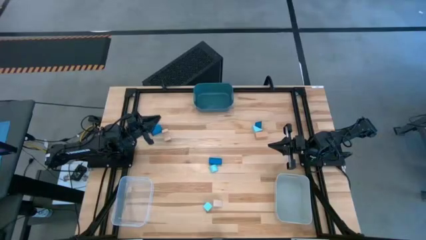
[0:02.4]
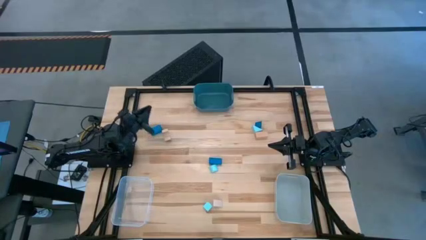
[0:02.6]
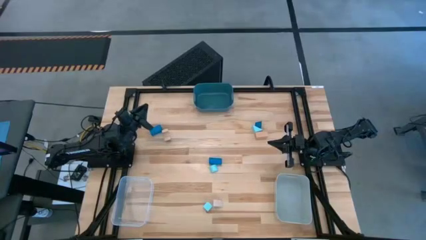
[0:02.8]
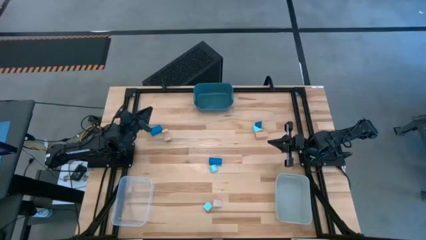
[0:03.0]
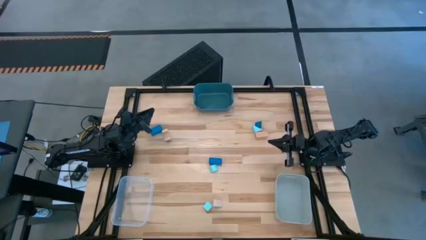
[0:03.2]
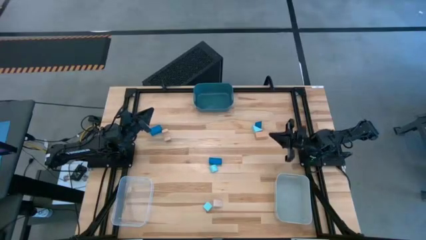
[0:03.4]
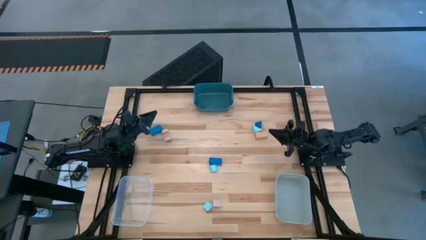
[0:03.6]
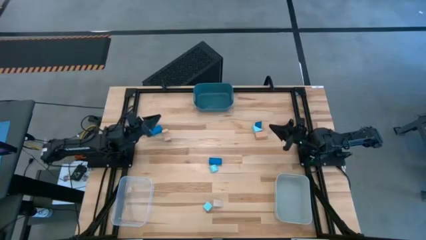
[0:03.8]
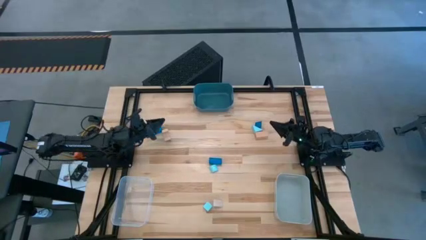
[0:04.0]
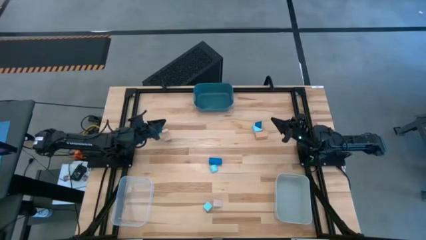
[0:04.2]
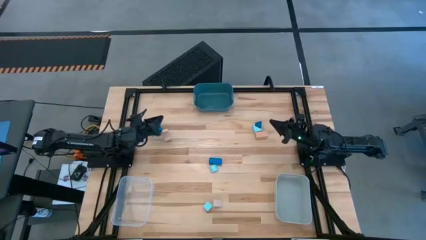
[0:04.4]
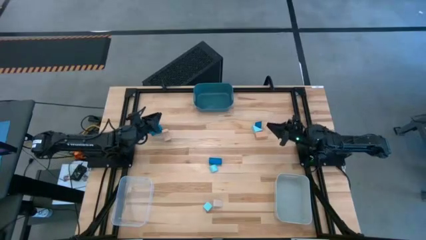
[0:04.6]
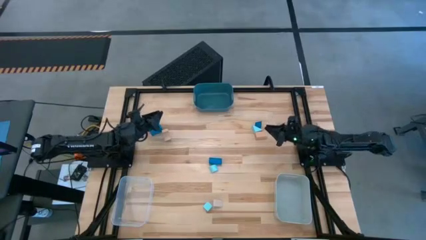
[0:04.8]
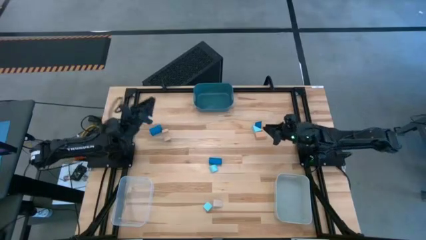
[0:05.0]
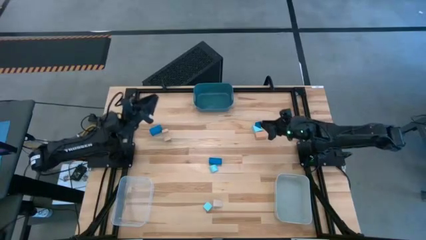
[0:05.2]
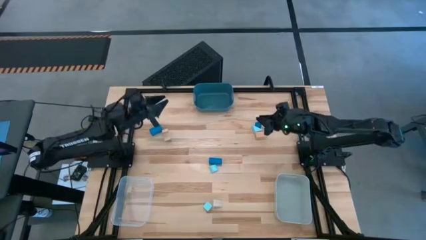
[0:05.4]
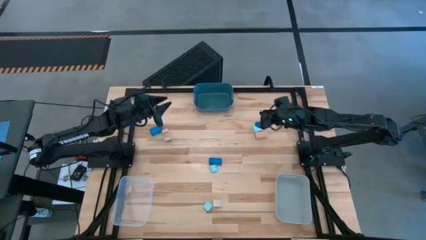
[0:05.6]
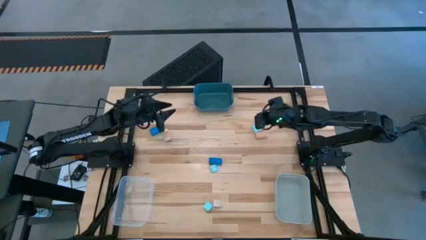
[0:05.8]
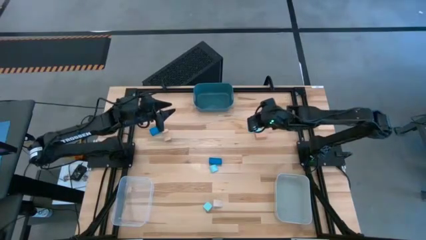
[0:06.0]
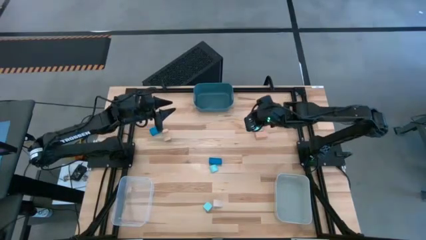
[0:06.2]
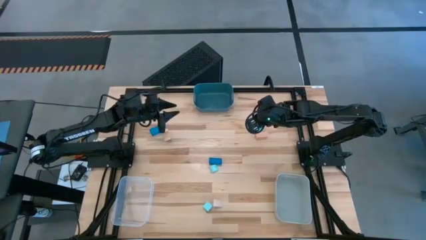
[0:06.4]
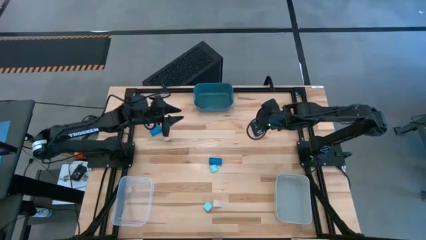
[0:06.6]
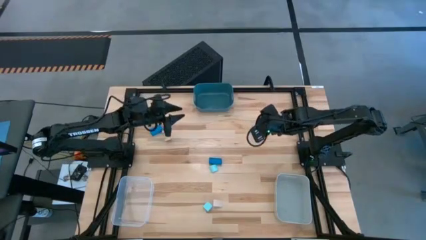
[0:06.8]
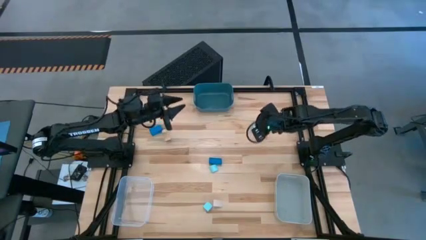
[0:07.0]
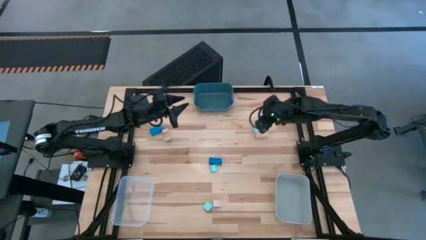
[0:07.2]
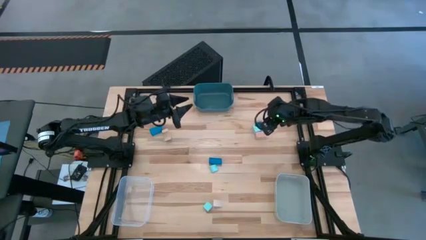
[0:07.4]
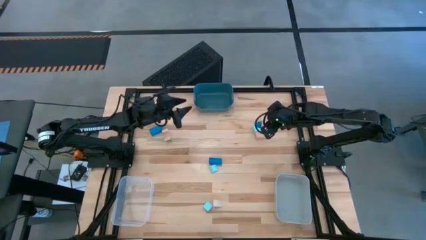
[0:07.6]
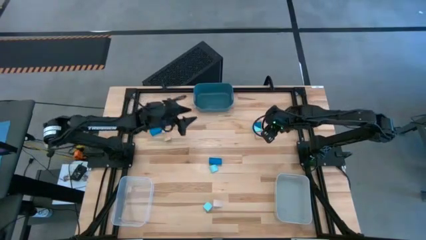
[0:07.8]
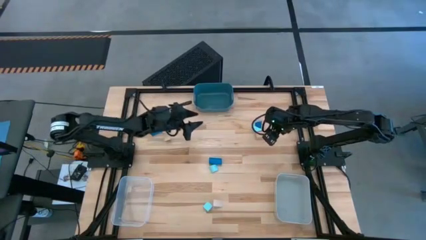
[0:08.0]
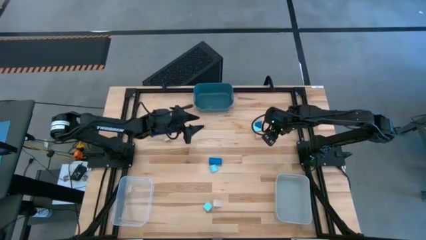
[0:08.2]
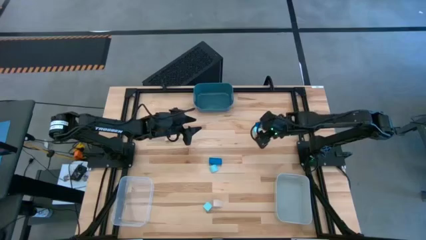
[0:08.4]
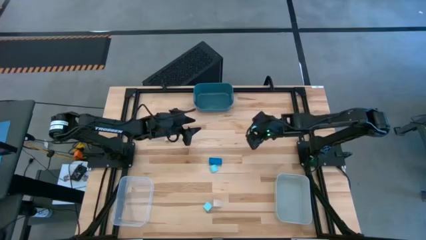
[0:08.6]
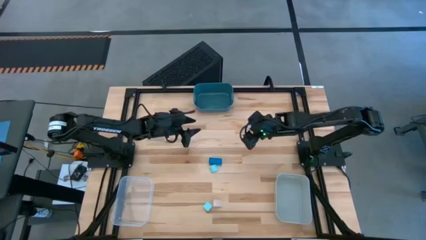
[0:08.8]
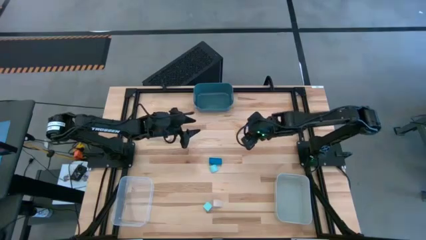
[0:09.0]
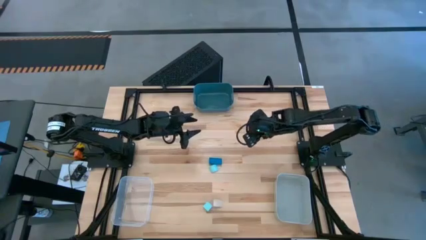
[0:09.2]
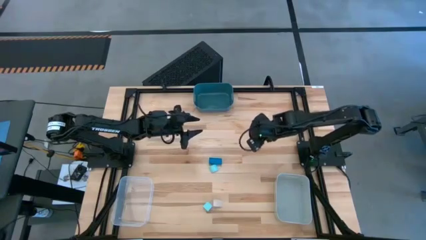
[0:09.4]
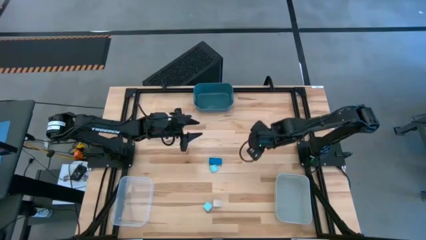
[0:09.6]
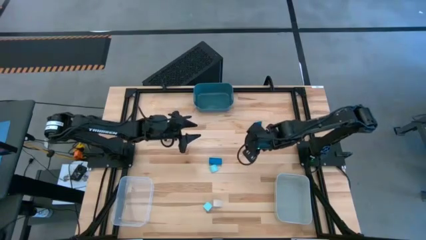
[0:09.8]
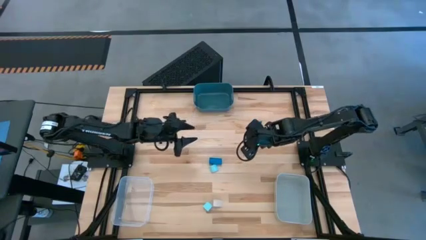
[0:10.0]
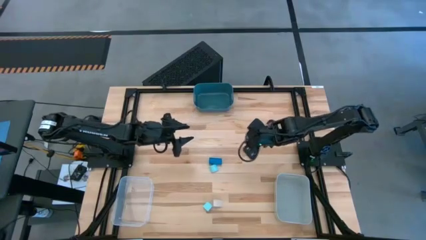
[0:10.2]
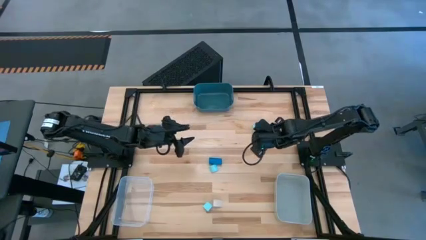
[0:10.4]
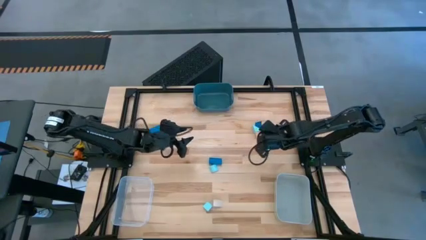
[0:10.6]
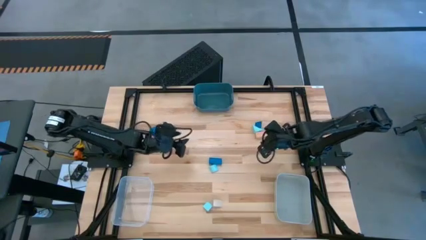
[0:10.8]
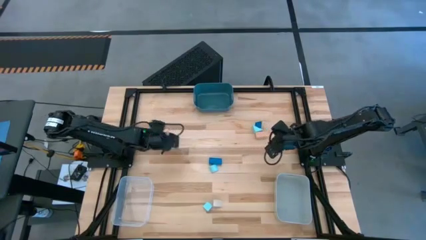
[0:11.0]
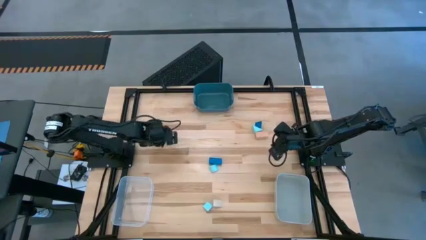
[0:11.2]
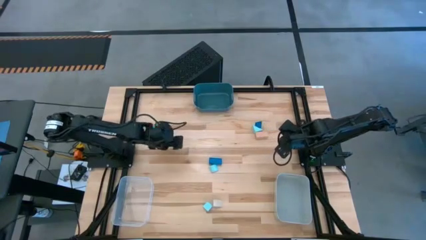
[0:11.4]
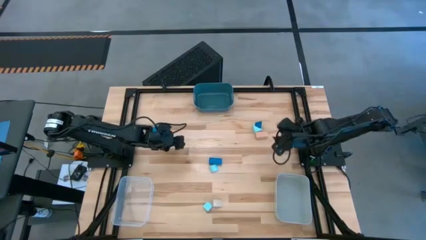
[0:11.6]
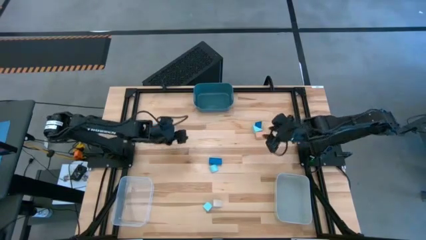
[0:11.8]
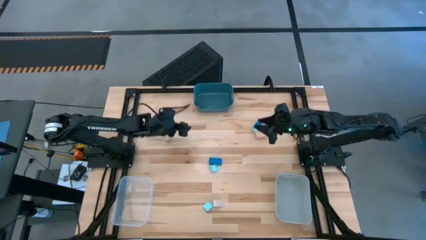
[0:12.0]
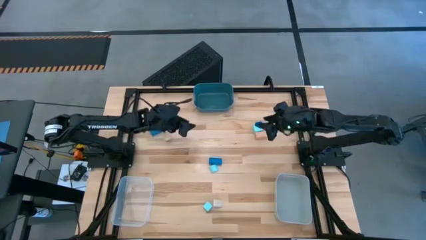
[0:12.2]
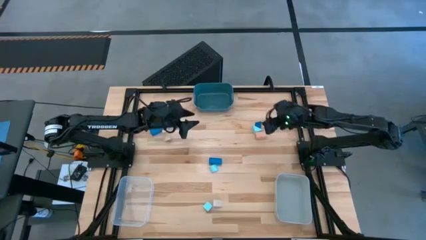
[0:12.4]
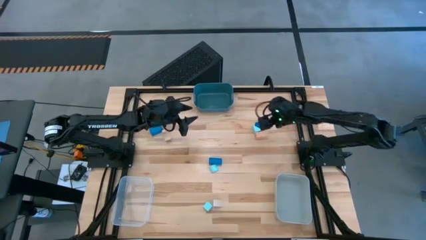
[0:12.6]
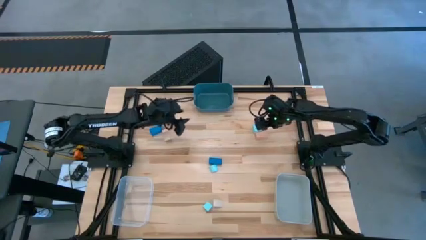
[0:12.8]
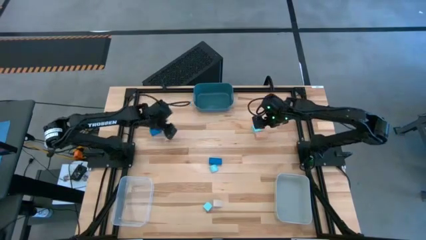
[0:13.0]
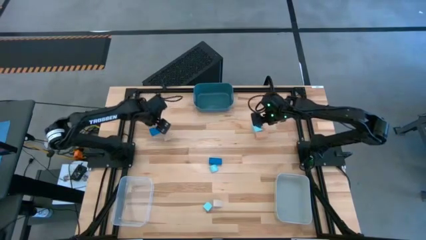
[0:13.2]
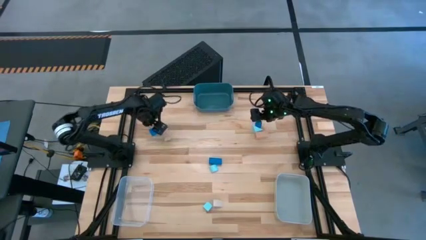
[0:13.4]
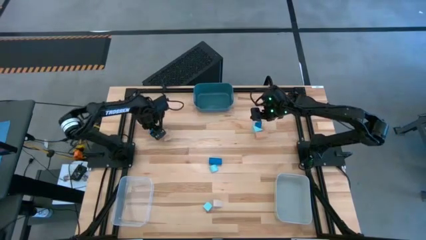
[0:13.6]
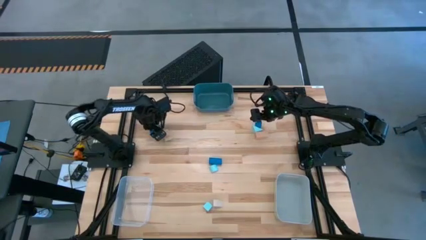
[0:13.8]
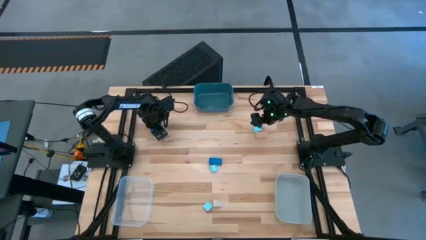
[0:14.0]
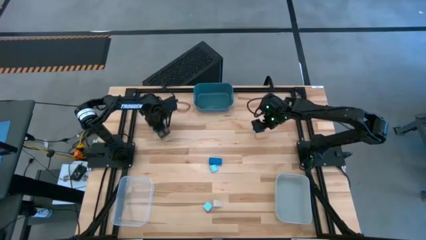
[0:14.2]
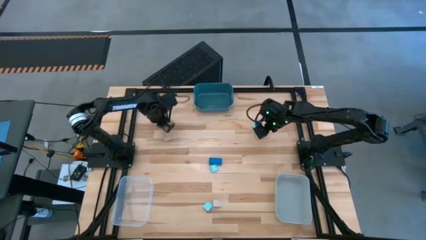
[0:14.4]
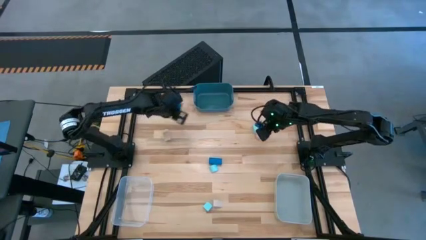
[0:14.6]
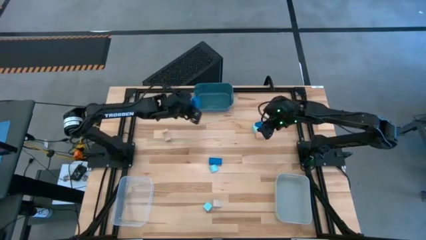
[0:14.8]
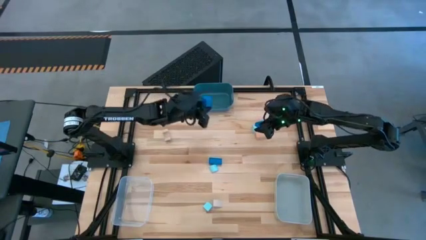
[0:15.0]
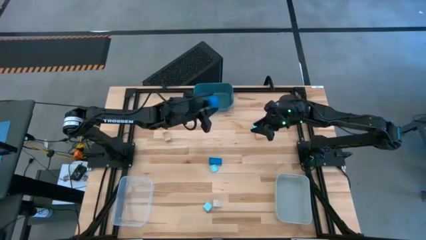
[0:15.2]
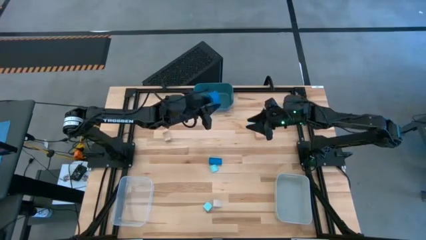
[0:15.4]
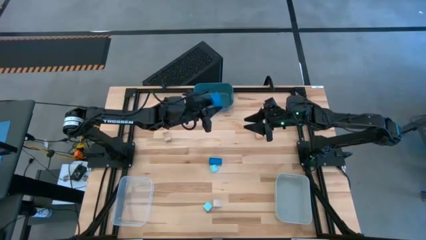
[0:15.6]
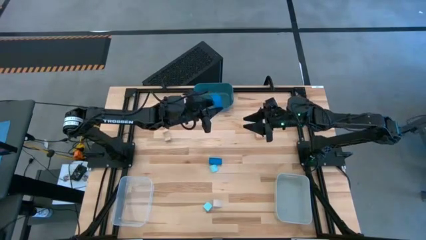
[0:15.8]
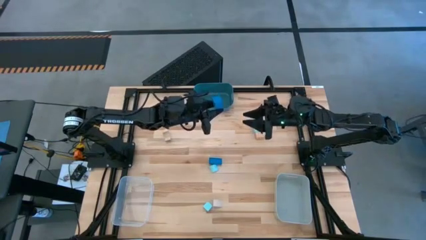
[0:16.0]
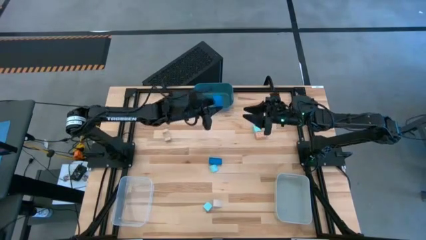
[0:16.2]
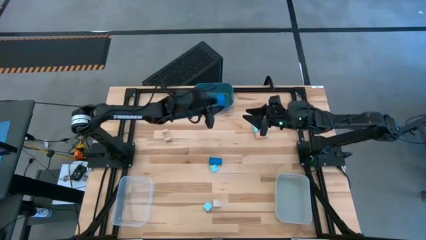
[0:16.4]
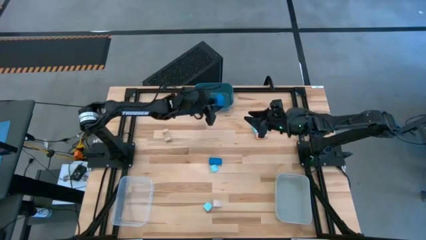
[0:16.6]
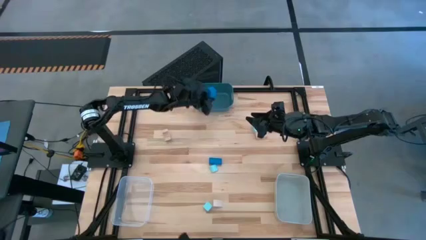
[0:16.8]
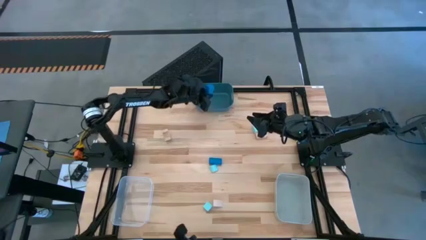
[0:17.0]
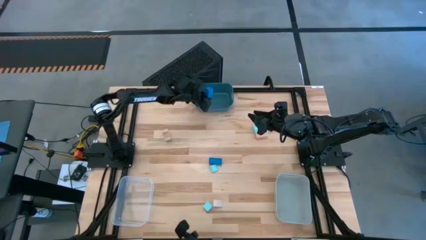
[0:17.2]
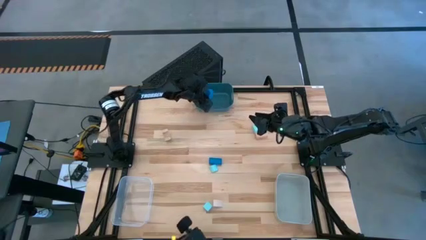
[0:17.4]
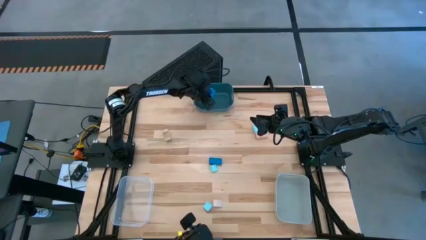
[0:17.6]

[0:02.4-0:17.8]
Task: Sort & place blocks by color
Put the top left blue block into the blue bin
